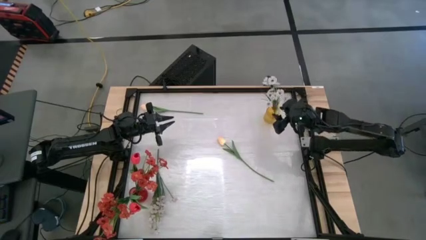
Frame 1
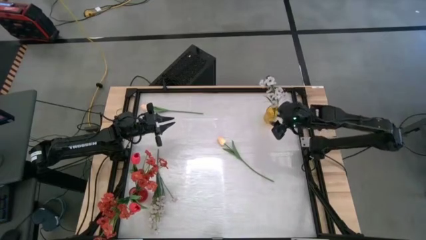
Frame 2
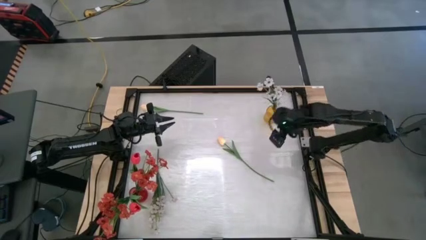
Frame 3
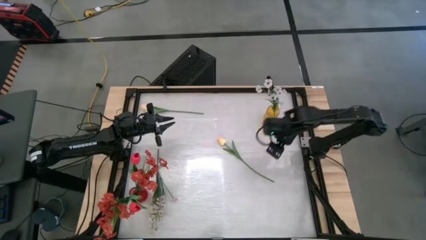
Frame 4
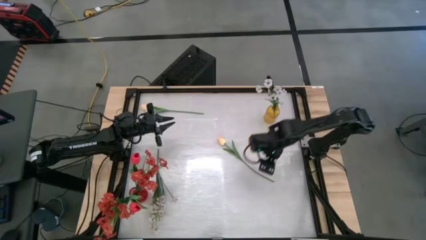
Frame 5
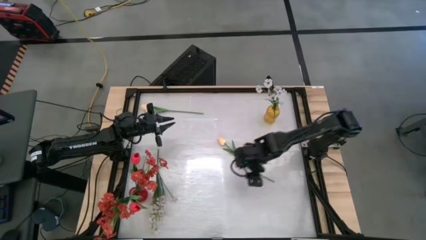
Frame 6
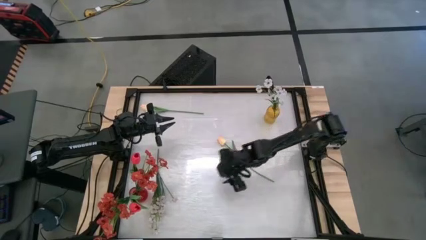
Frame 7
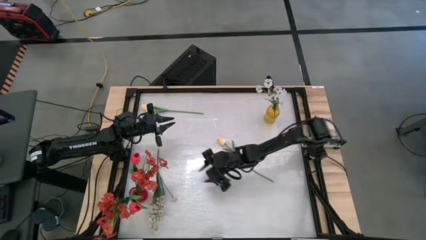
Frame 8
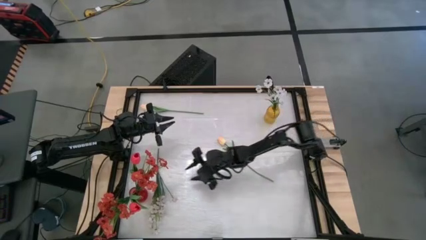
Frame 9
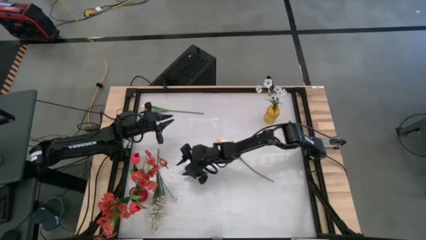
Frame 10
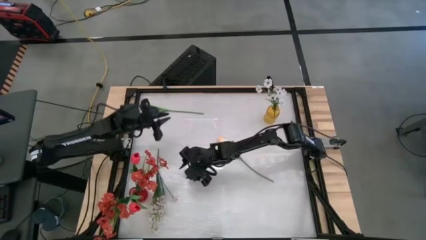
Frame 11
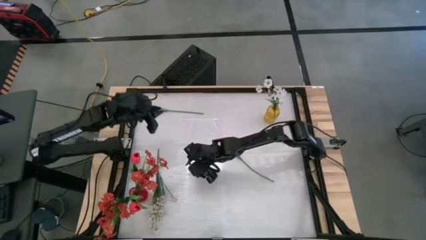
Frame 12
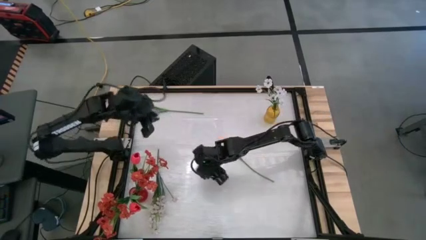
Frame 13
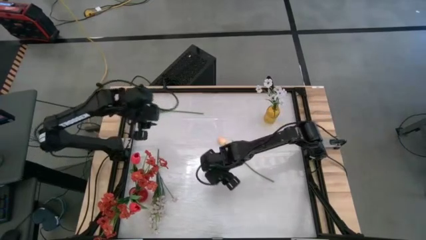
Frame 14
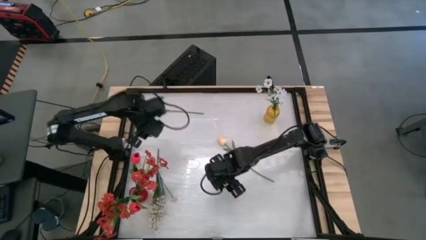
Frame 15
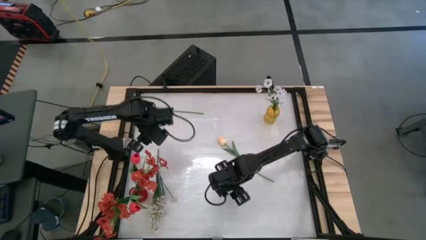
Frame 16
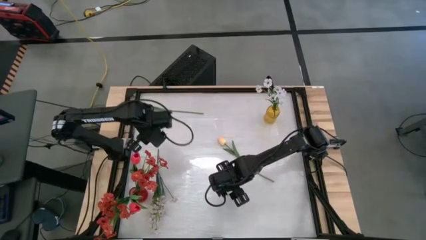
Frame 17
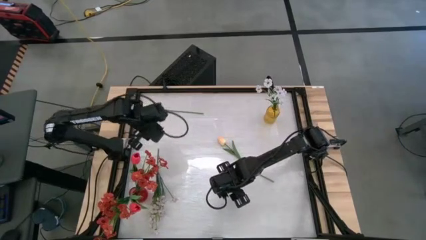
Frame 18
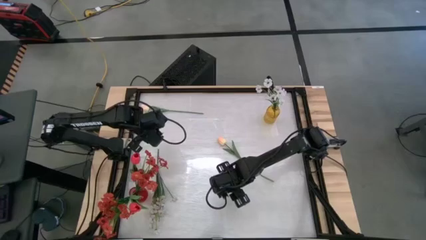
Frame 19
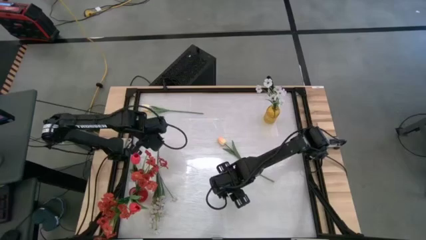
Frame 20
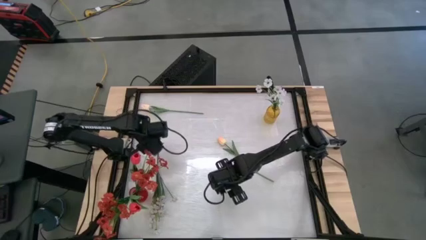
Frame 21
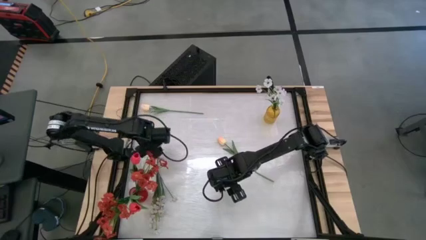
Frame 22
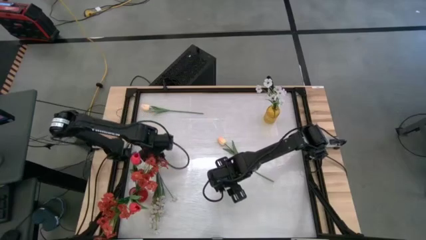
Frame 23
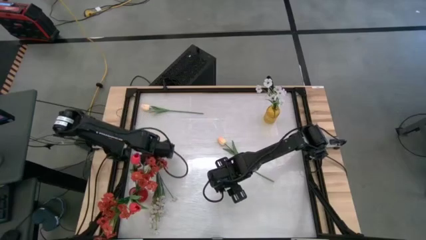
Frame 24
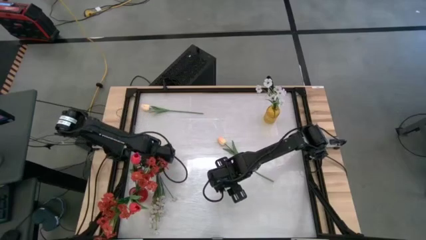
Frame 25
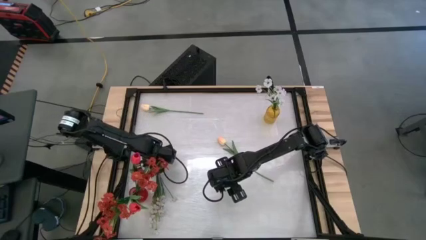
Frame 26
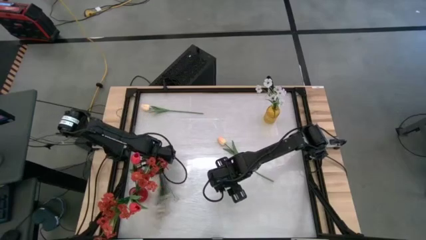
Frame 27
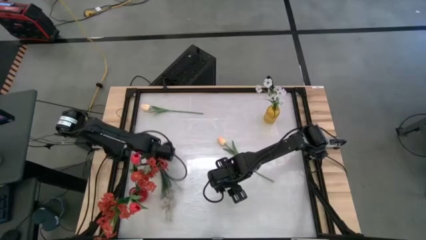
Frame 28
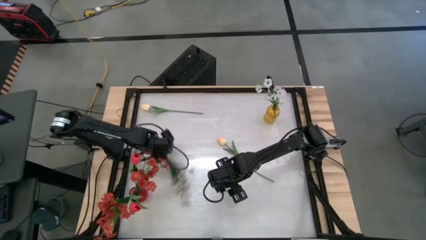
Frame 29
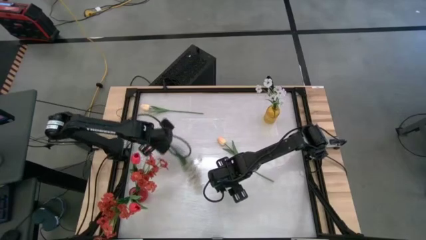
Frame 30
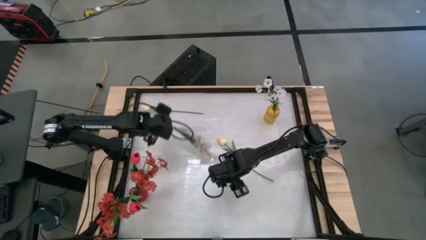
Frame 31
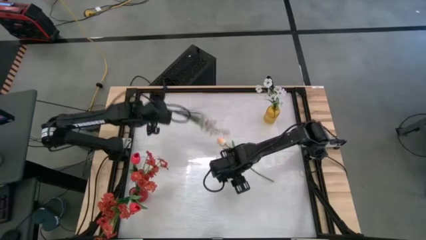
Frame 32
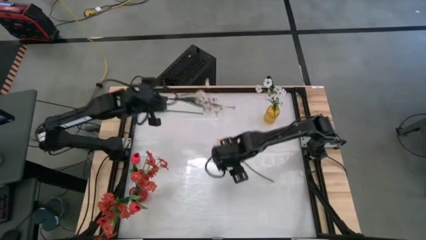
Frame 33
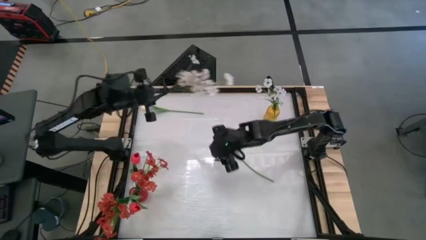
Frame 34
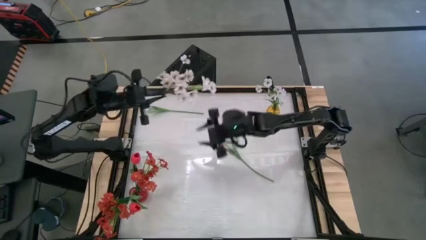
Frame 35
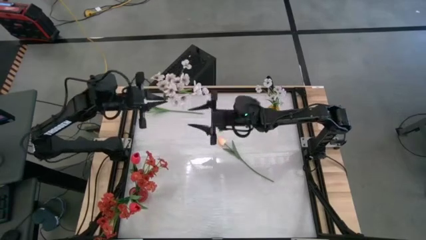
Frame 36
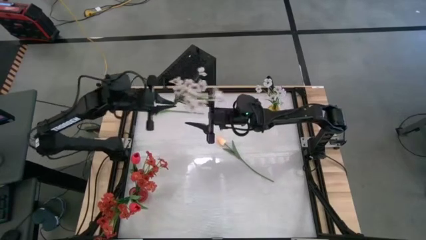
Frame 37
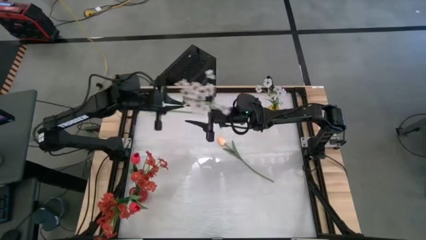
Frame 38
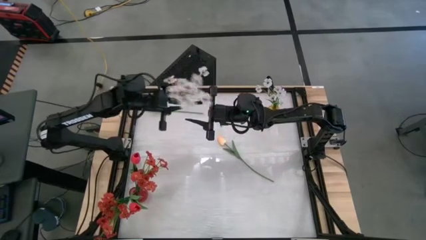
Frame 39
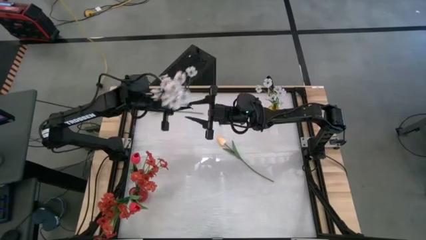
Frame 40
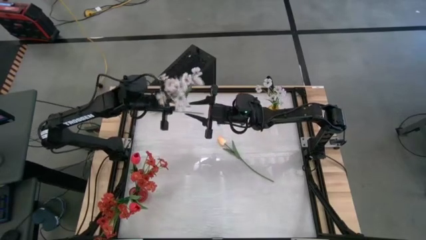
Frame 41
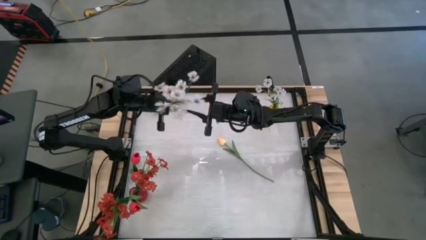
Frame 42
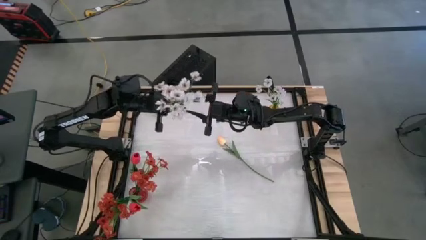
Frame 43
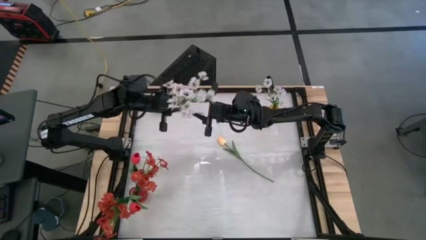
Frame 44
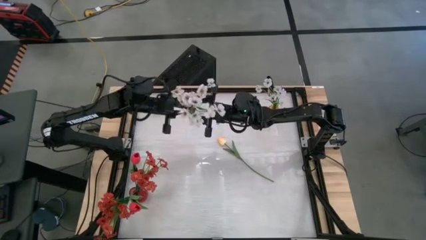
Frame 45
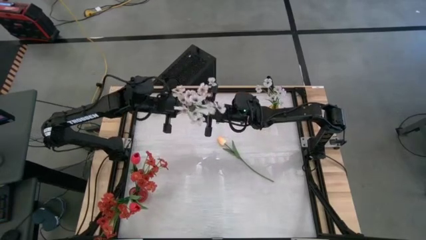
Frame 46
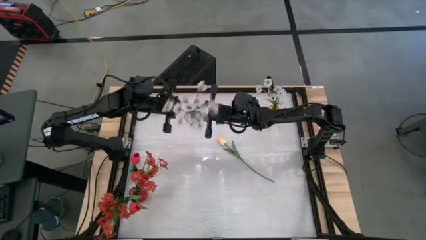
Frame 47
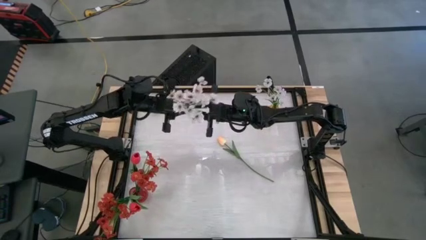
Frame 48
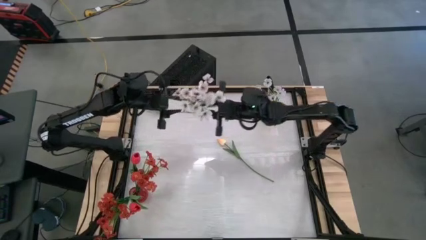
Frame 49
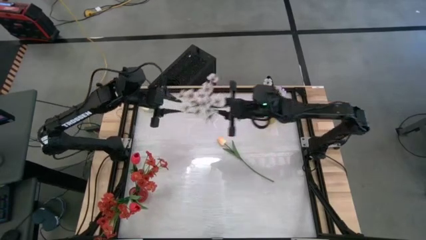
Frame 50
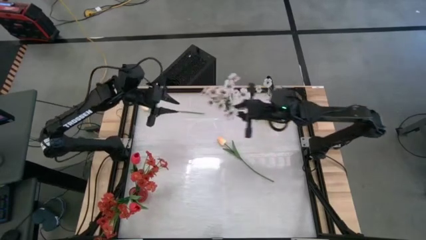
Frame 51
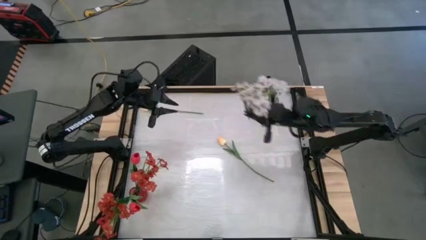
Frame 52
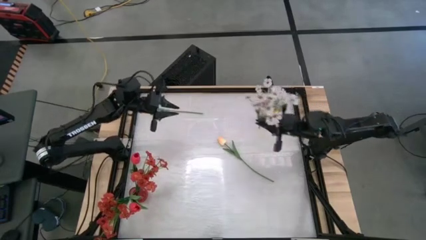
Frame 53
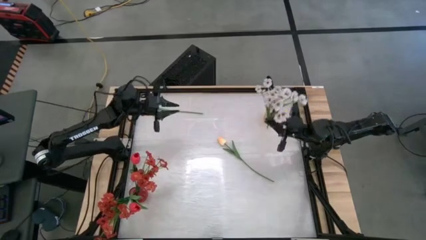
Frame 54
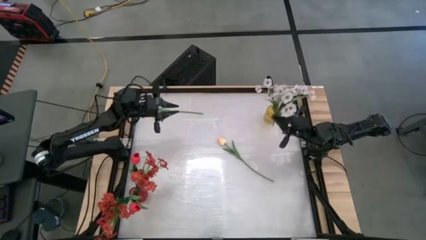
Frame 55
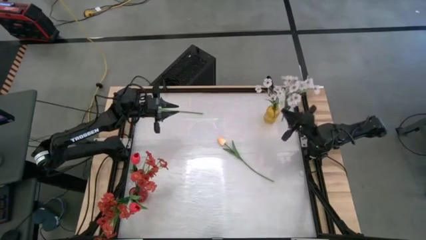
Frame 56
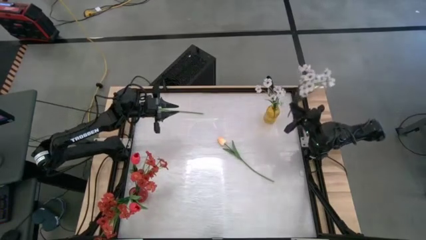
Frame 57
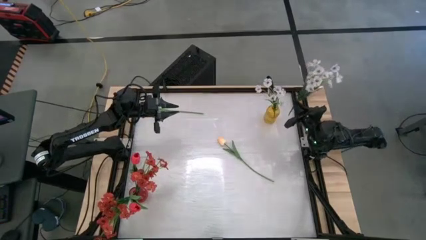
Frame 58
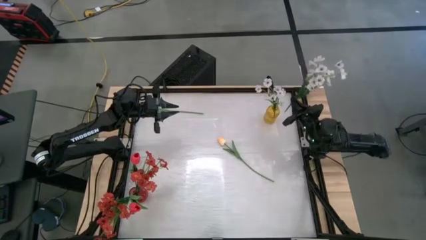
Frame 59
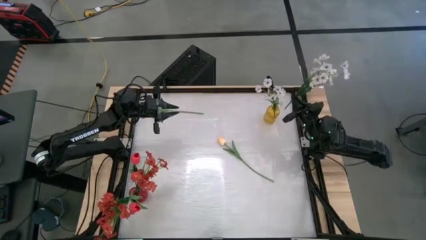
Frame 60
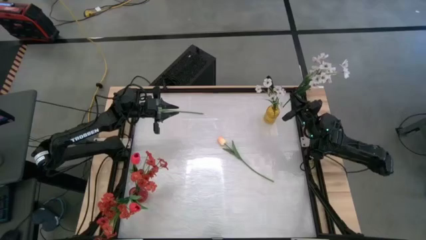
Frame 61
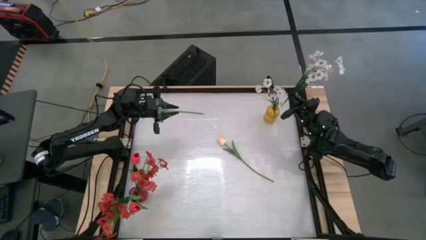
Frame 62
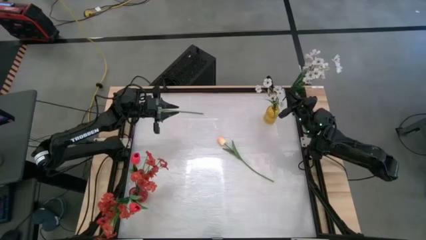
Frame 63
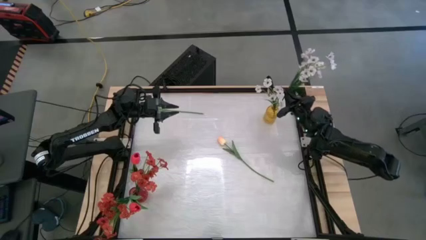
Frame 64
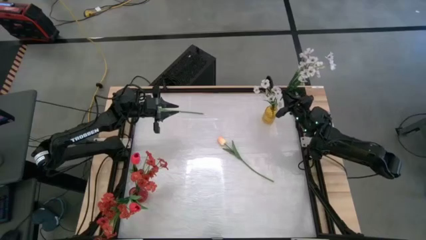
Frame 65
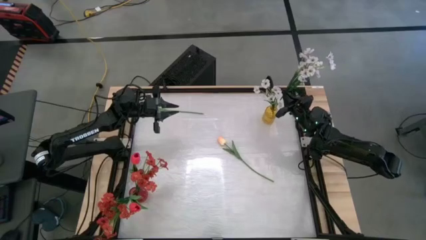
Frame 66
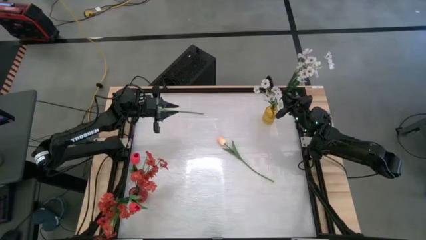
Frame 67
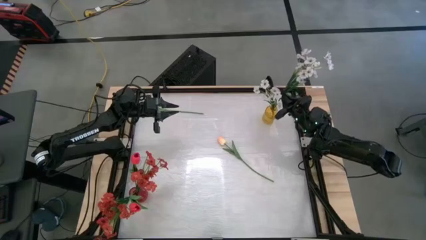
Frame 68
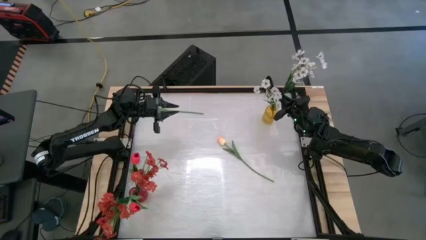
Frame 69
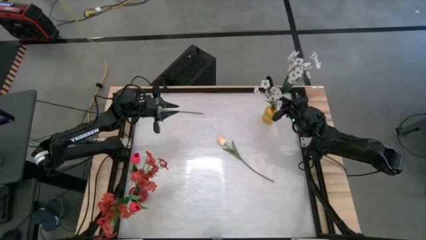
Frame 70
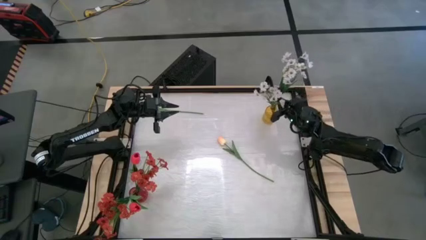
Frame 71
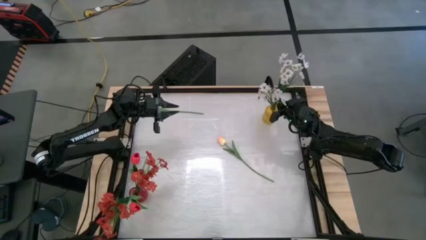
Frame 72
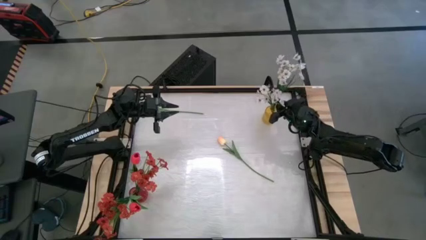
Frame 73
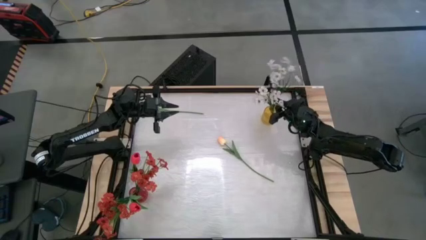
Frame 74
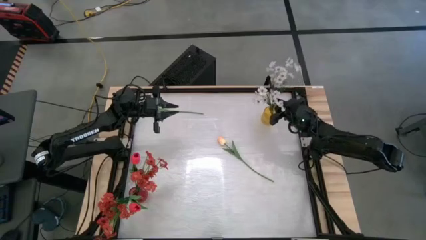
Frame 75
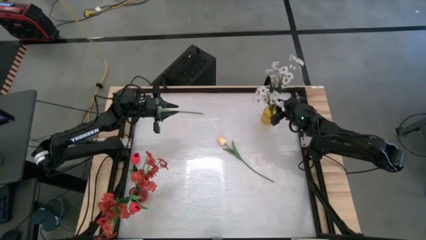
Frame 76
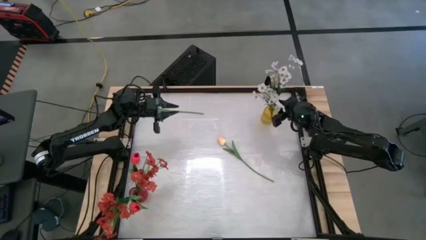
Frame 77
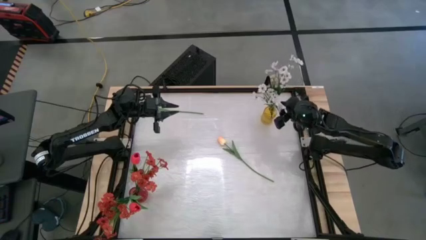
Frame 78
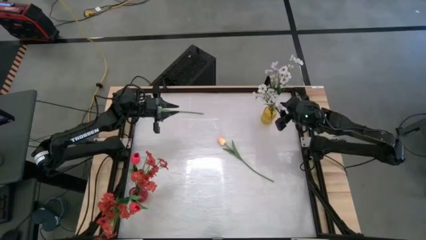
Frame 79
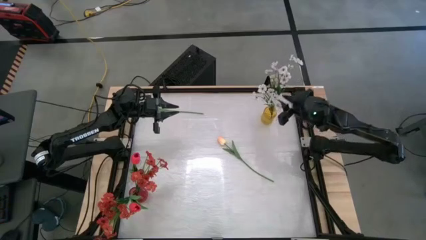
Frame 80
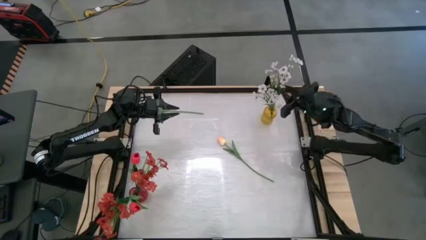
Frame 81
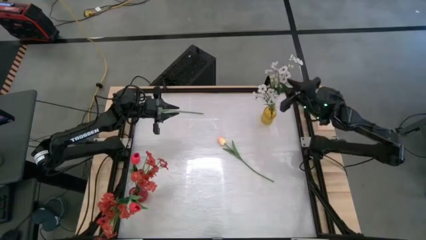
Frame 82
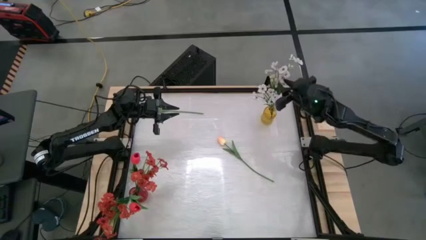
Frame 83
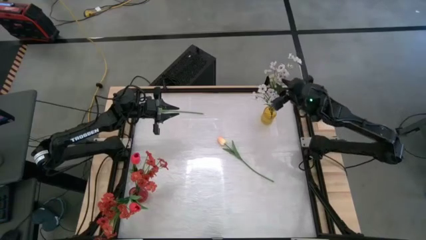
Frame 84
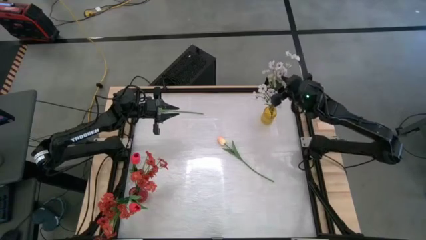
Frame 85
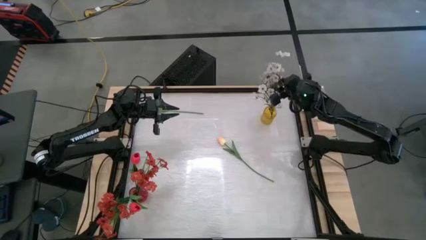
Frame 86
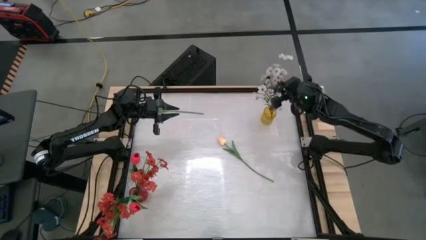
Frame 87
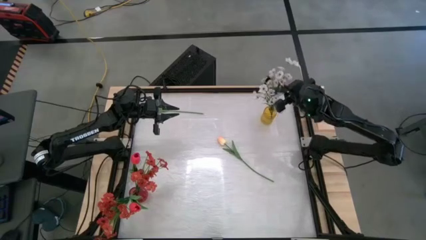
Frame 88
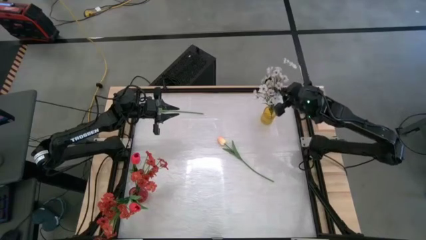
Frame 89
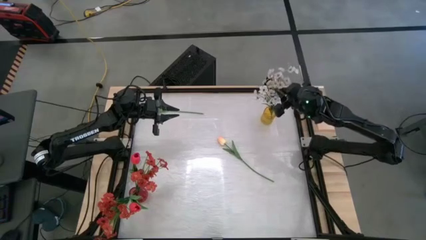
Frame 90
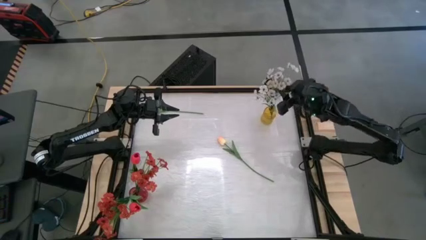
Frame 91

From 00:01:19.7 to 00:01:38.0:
Task: Sort flowers into vase by color
Put the white flowers into the yellow vase
